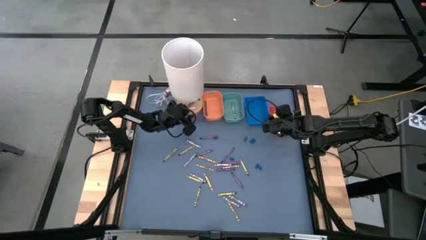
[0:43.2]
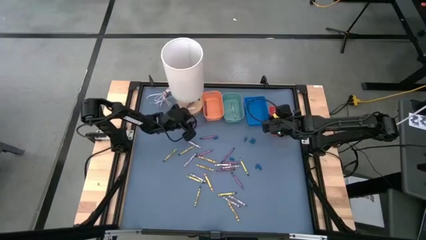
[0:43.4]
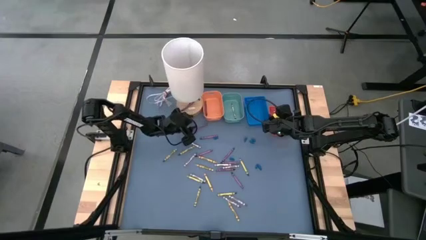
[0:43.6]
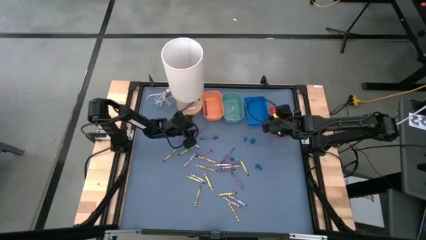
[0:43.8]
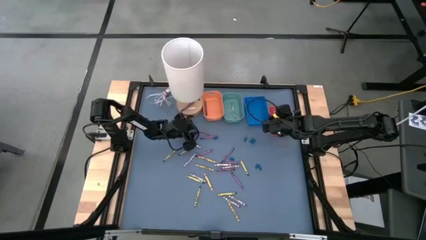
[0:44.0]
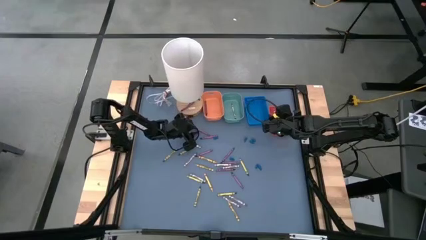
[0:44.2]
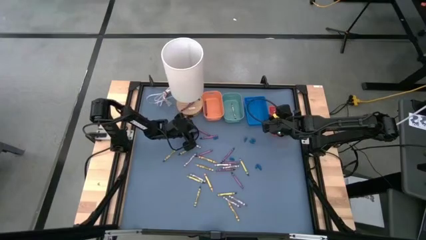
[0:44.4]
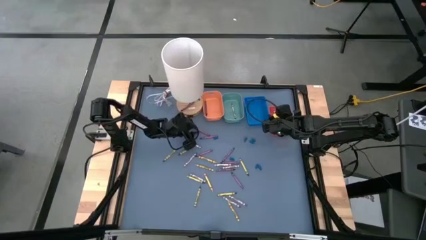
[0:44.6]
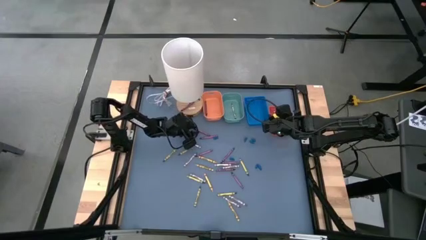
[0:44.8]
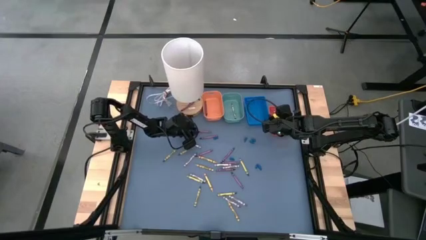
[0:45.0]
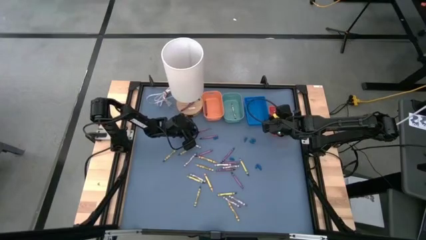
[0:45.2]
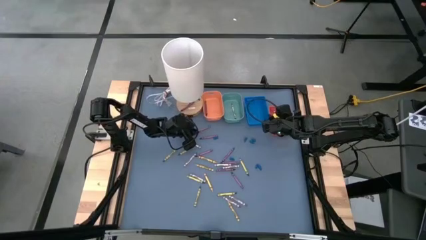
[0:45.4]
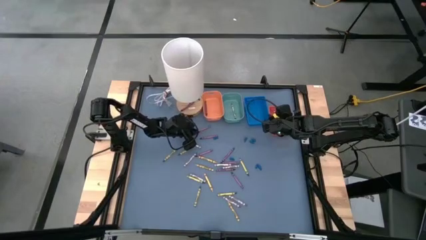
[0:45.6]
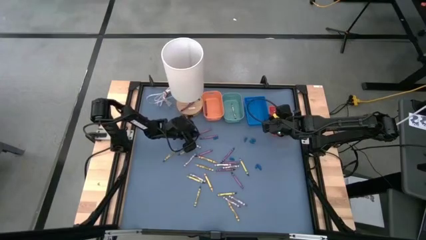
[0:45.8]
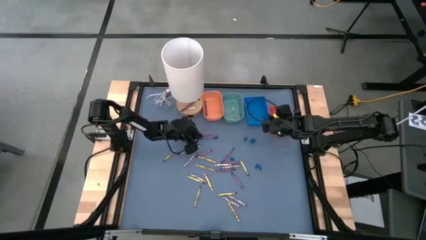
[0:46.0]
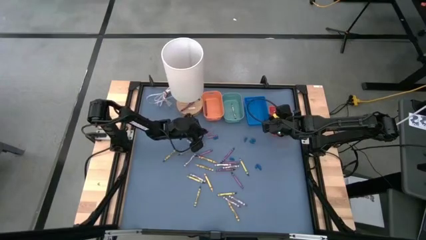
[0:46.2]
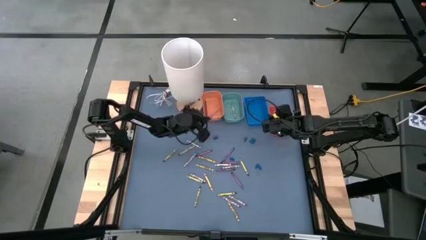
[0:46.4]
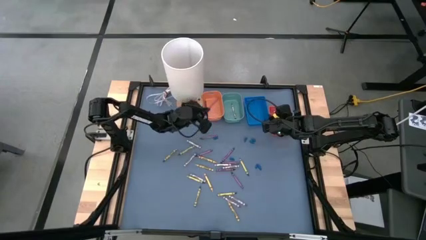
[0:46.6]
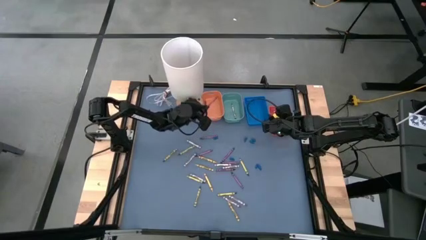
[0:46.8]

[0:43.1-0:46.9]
Task: Sort crayons
Put the purple crayon into the light orange bin

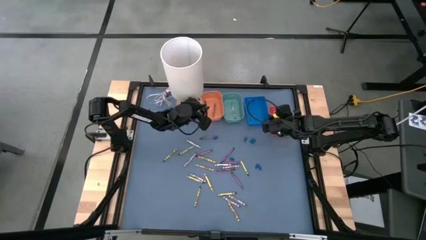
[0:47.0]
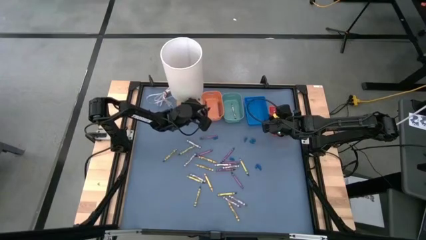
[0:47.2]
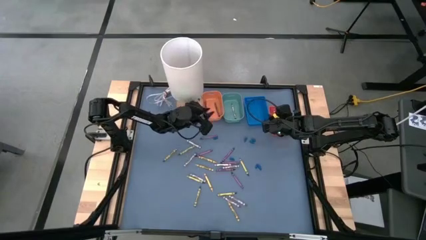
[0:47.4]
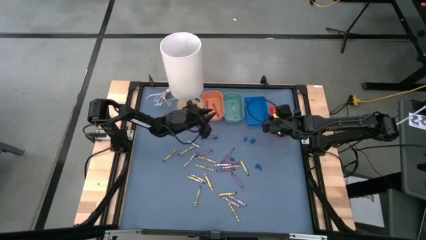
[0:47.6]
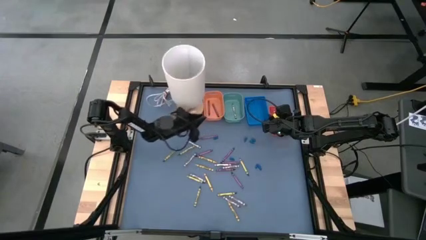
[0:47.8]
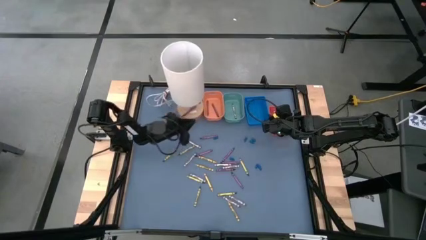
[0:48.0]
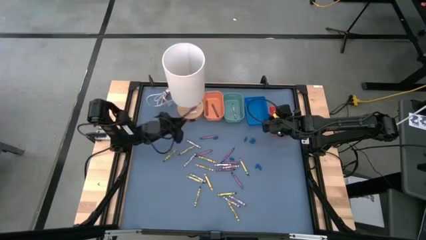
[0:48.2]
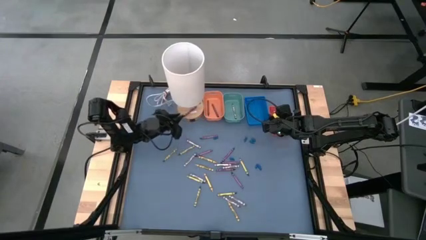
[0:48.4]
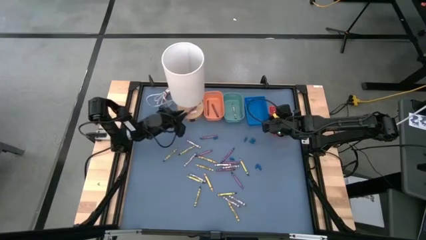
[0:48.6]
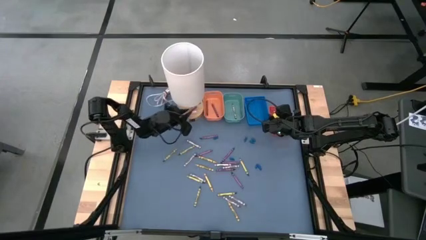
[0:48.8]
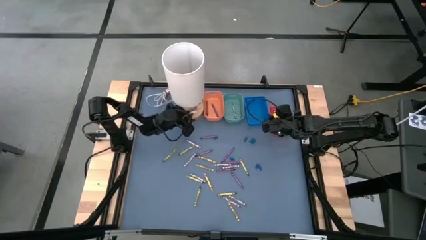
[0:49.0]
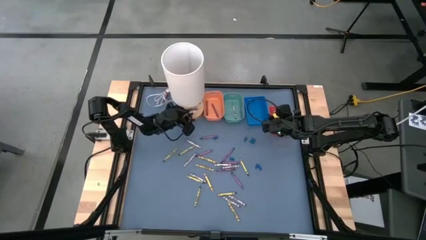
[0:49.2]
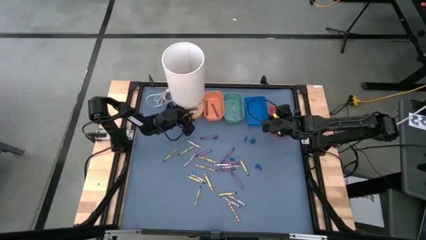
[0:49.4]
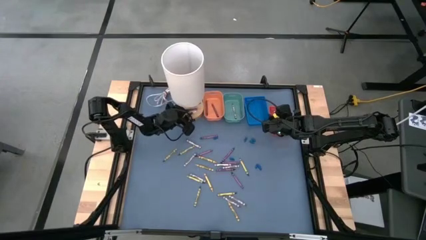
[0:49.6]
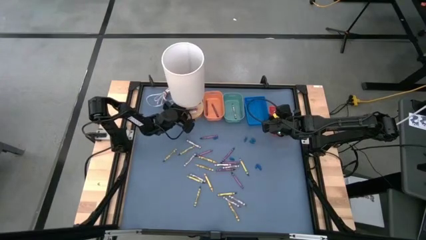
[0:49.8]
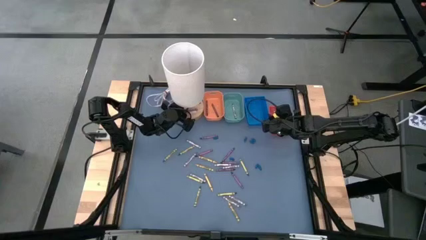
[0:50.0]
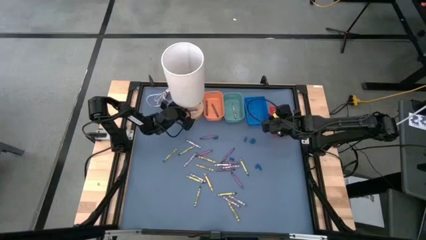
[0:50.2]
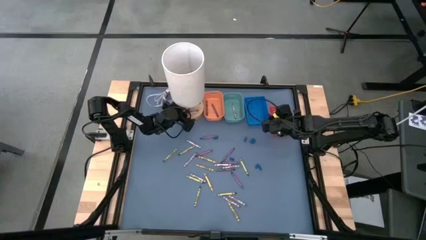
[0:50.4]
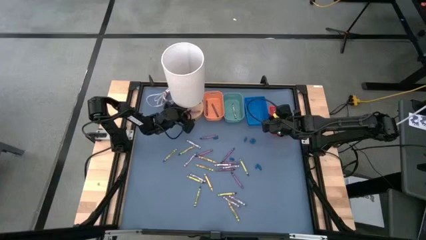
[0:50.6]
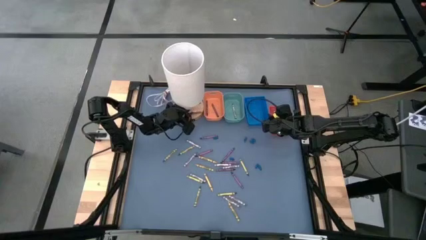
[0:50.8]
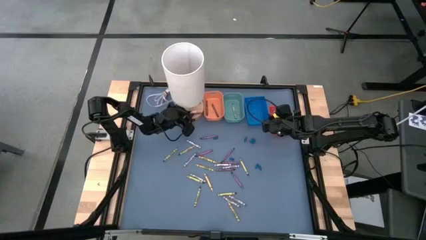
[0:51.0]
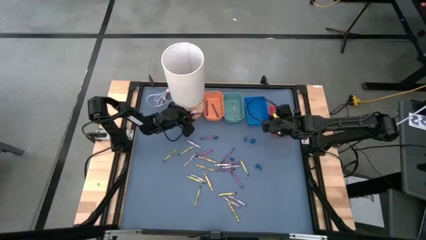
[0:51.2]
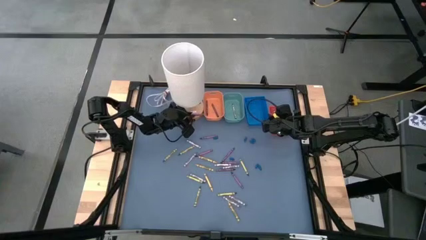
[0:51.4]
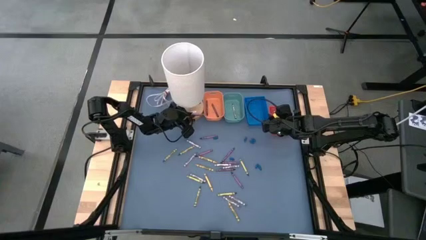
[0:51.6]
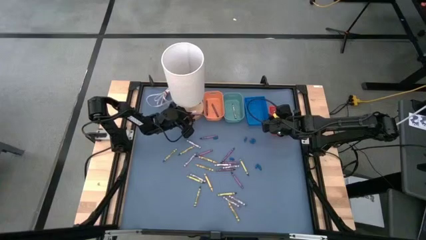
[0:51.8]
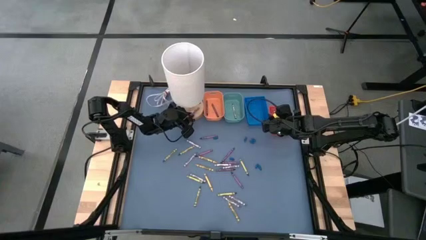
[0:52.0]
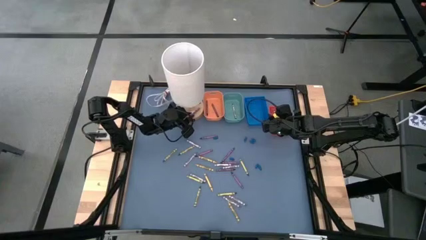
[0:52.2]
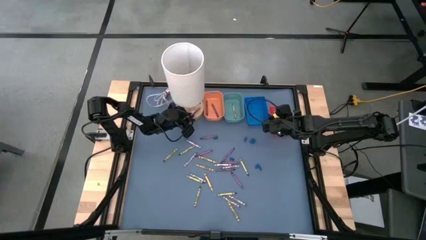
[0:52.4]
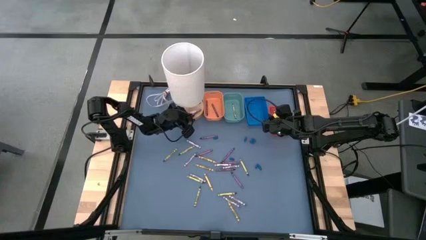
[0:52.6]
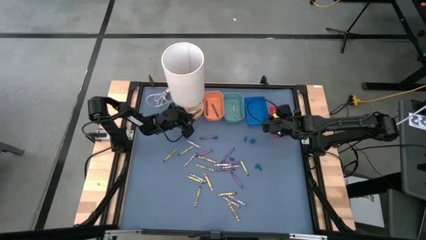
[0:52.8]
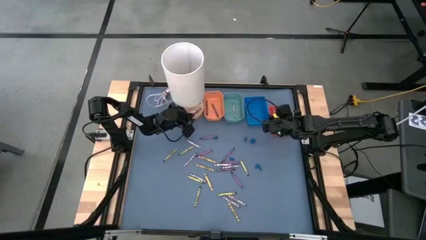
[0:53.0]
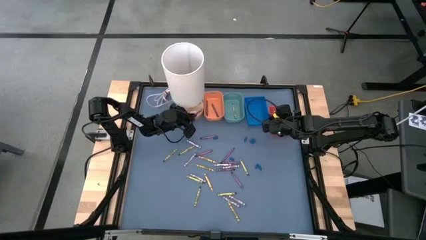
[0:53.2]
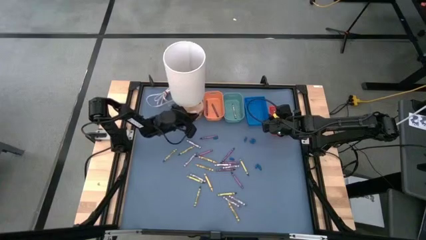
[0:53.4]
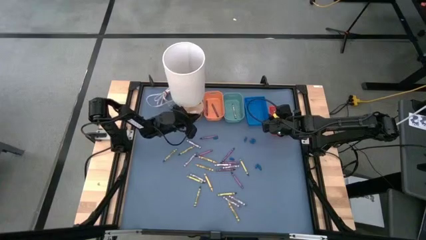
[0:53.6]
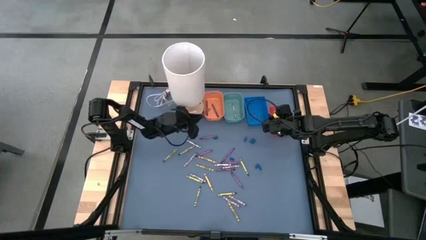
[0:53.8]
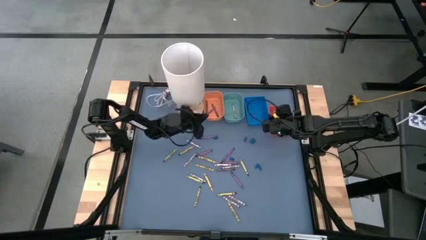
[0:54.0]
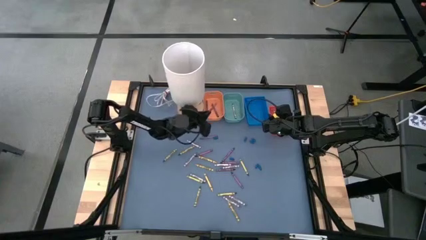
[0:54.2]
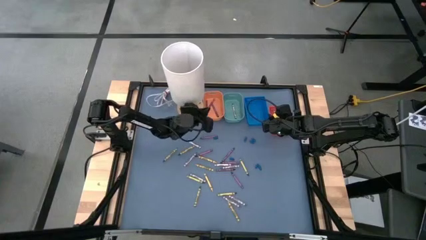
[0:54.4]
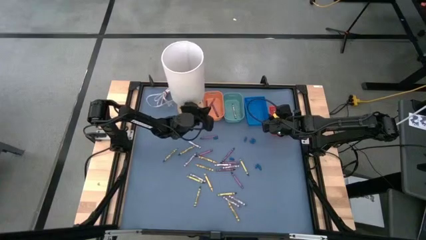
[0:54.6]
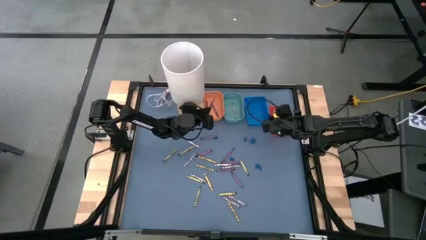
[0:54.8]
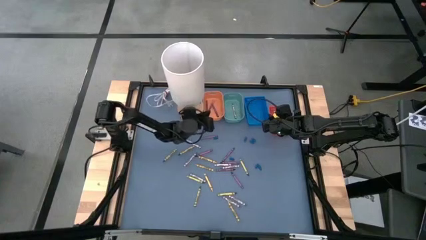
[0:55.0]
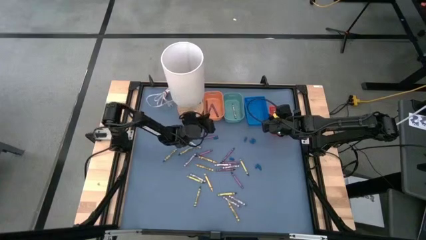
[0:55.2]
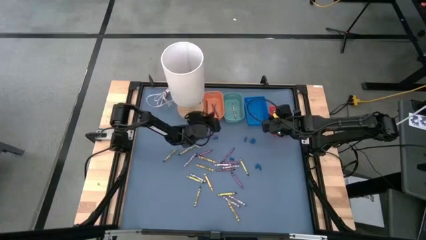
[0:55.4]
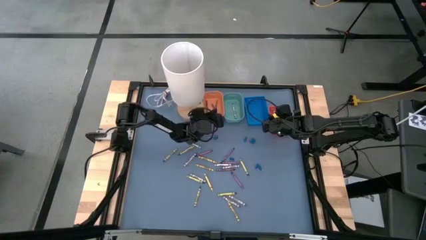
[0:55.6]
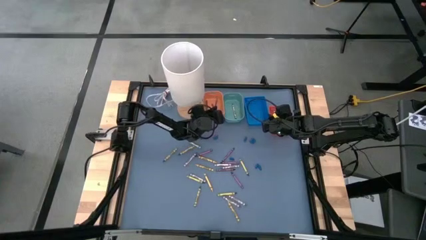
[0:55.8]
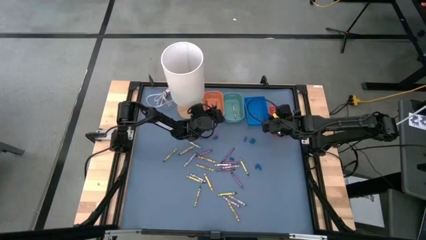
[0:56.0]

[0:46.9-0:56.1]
Put the purple crayon into the light orange bin

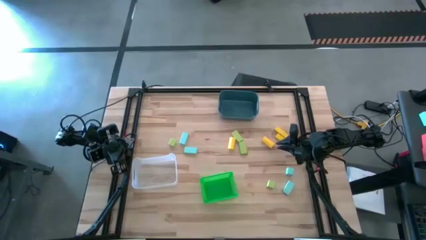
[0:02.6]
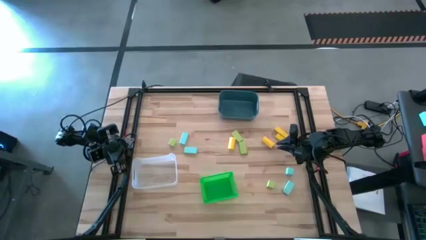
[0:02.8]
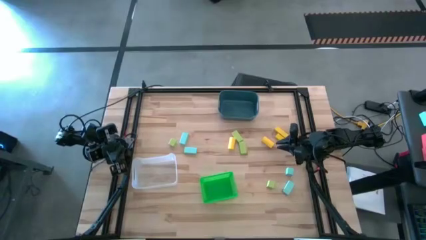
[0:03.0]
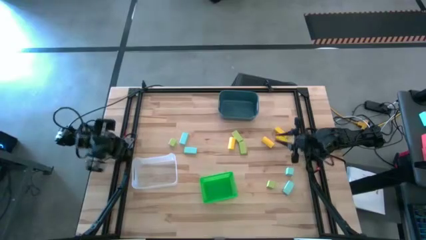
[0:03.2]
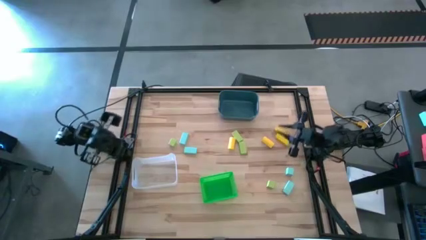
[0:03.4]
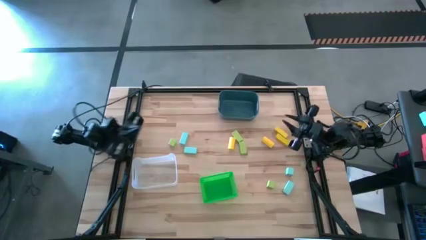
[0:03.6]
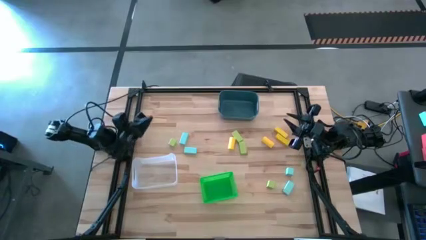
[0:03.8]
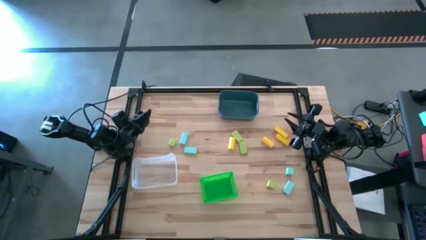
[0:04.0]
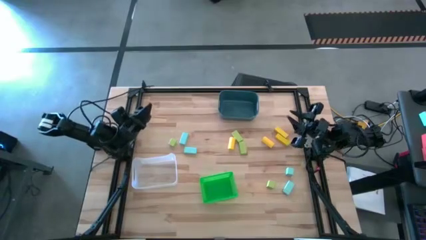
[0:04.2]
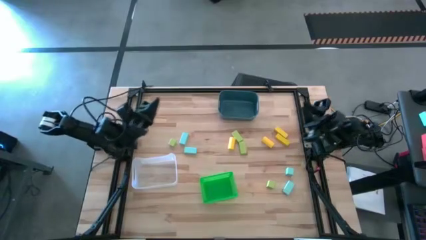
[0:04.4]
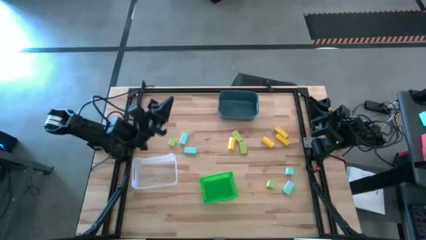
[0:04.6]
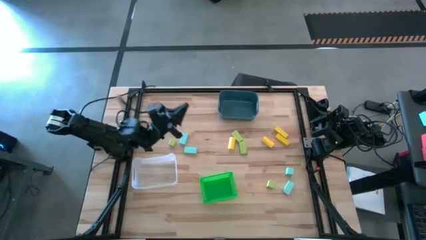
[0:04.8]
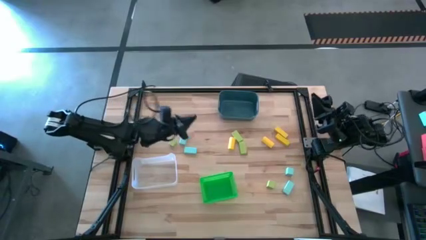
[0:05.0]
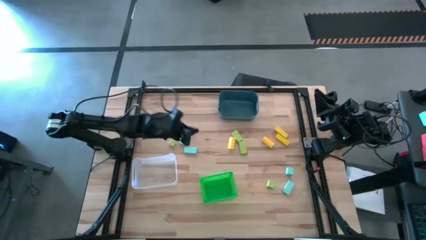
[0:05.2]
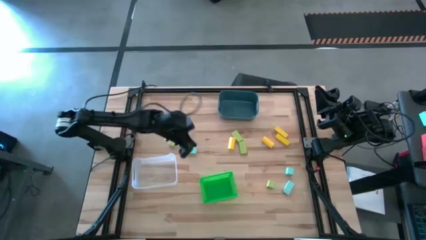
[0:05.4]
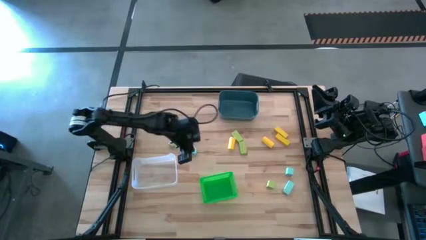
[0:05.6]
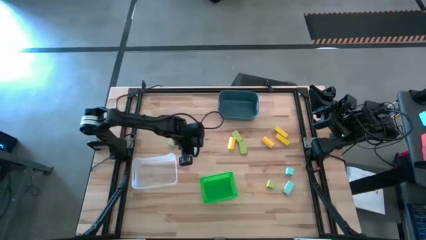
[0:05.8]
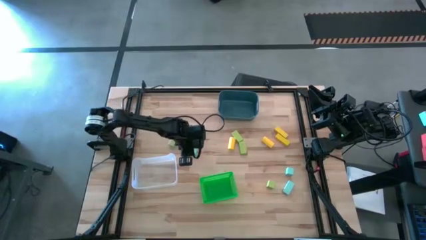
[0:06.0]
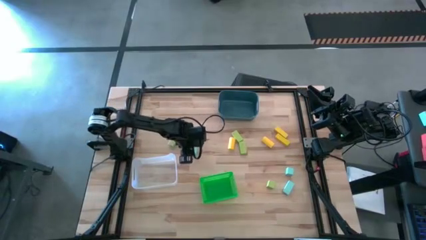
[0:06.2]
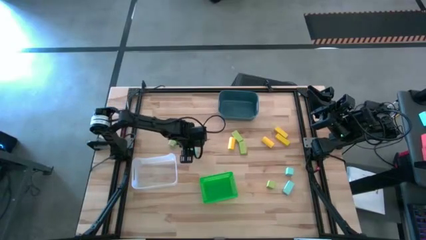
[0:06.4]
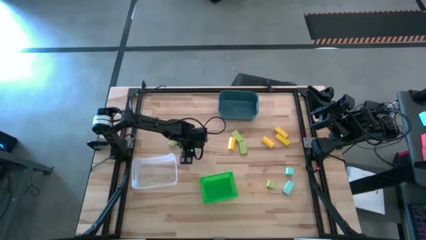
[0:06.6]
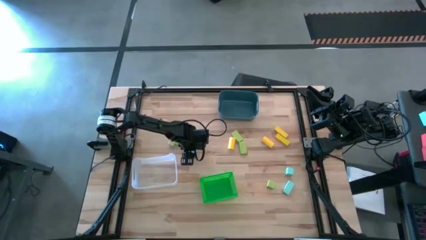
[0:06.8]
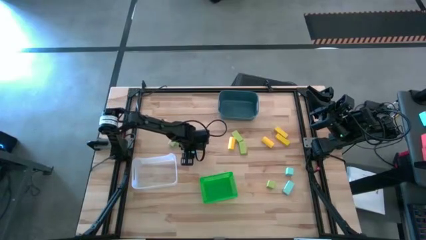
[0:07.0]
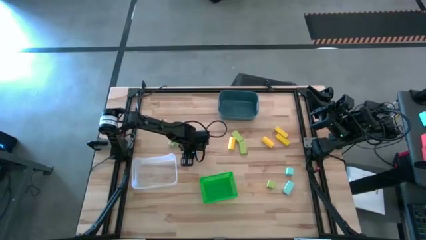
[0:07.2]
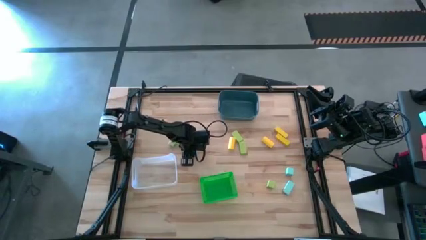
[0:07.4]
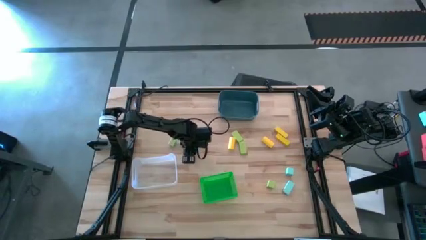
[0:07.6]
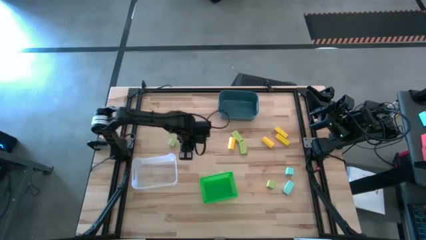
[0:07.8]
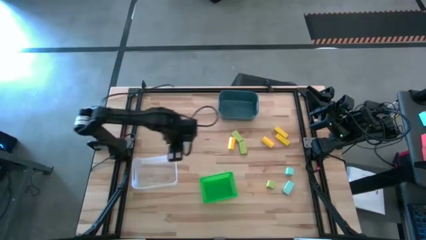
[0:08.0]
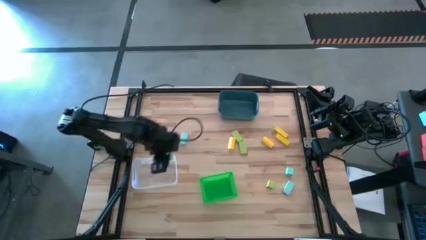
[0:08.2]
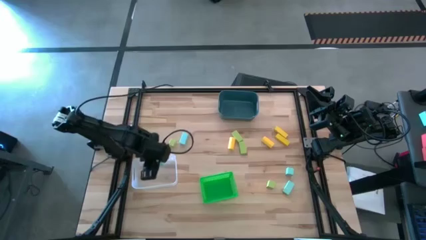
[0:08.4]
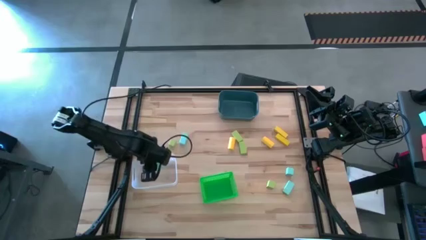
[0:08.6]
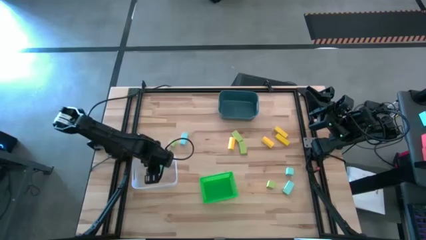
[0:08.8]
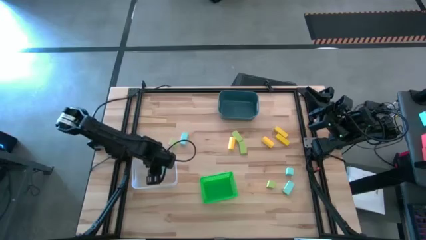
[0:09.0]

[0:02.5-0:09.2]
Task: Sort & place blocks by color
Put the light blue block into the transparent bin
